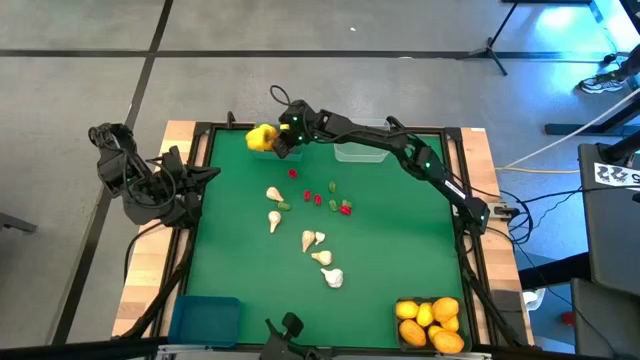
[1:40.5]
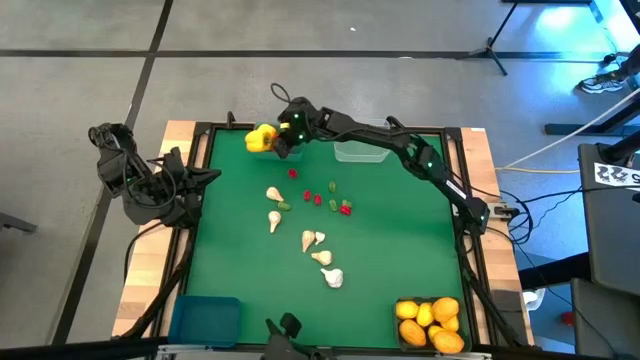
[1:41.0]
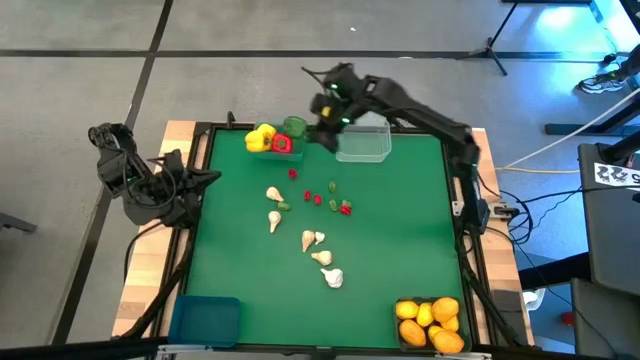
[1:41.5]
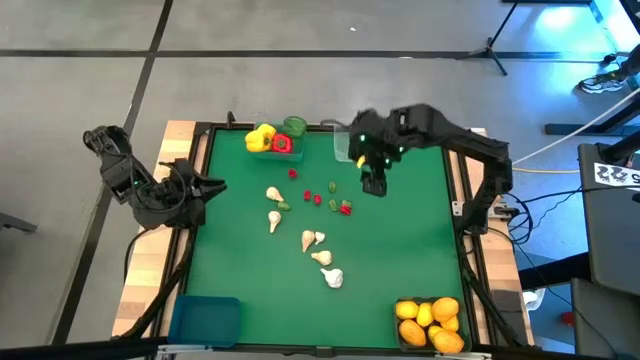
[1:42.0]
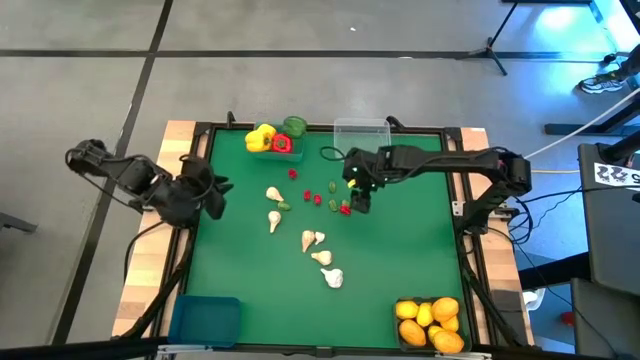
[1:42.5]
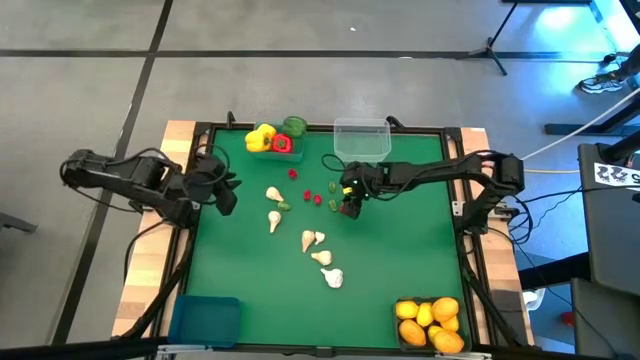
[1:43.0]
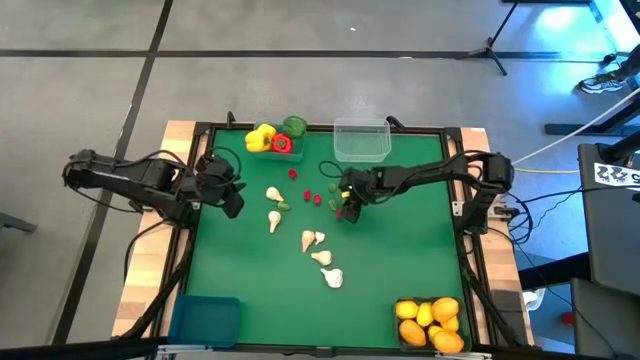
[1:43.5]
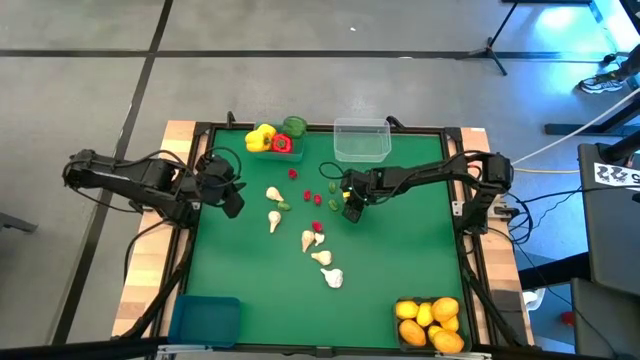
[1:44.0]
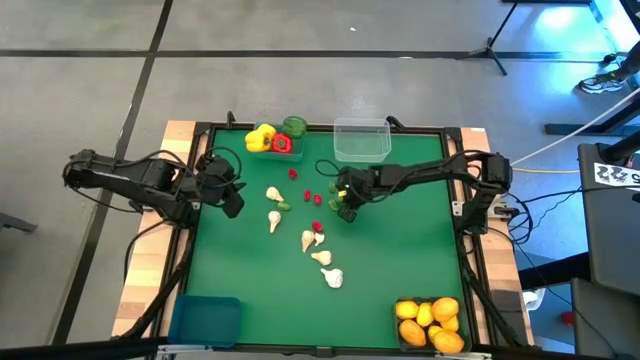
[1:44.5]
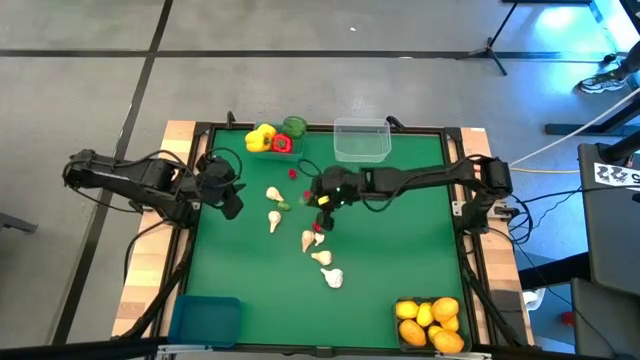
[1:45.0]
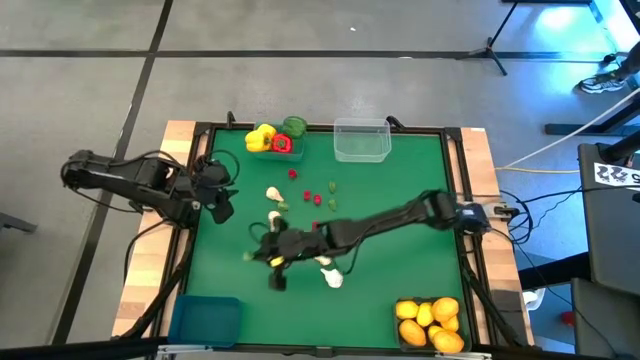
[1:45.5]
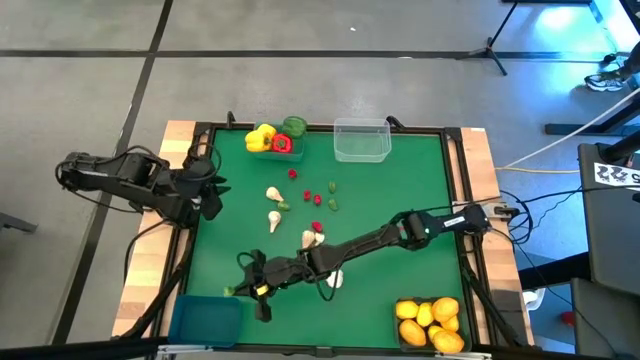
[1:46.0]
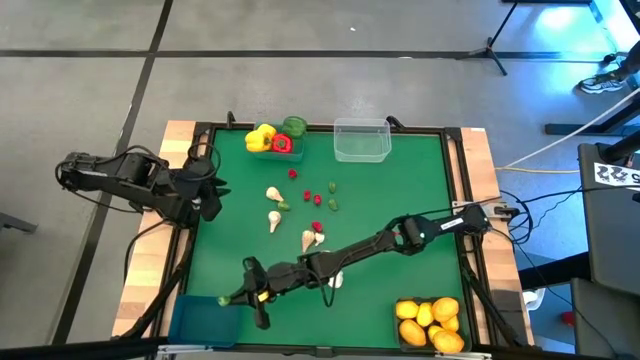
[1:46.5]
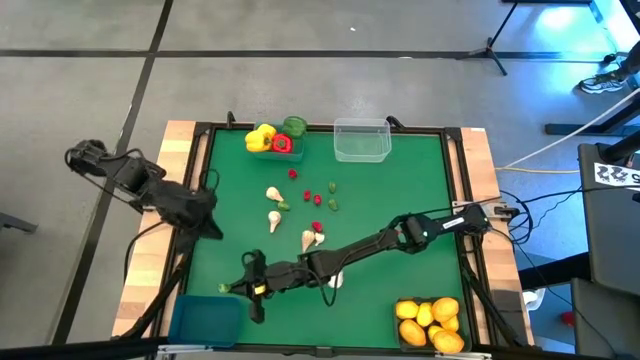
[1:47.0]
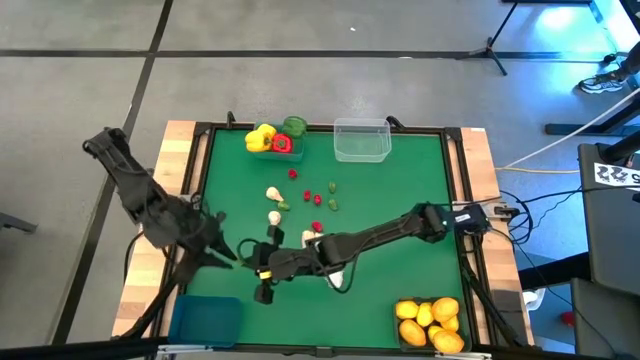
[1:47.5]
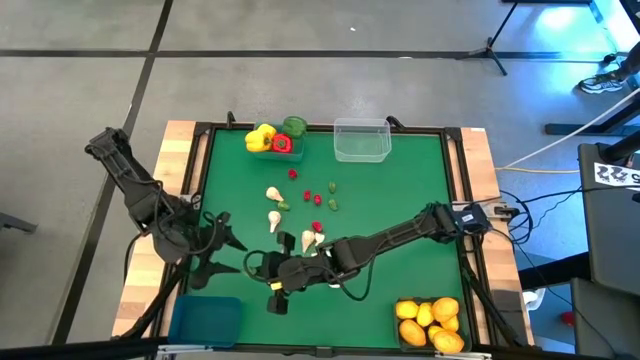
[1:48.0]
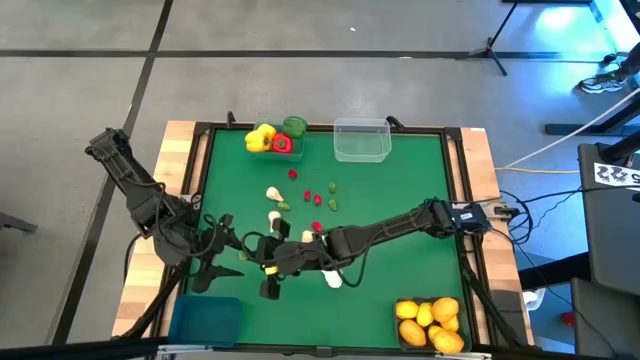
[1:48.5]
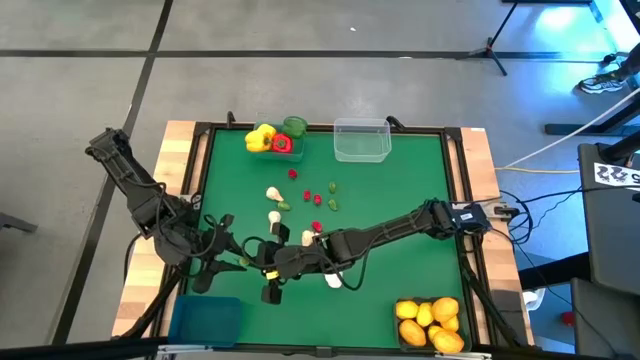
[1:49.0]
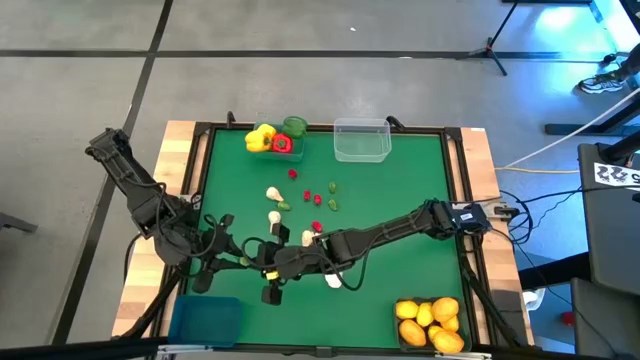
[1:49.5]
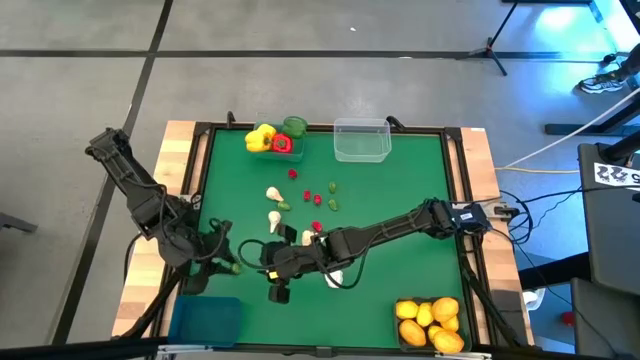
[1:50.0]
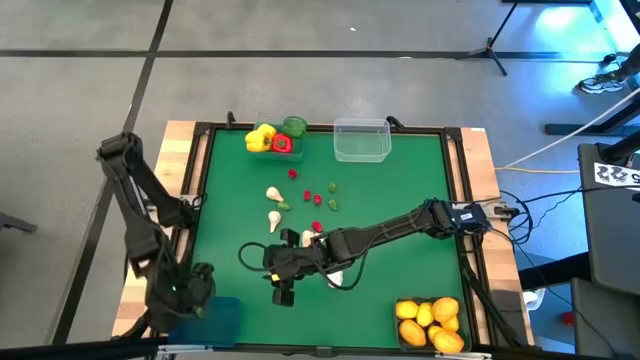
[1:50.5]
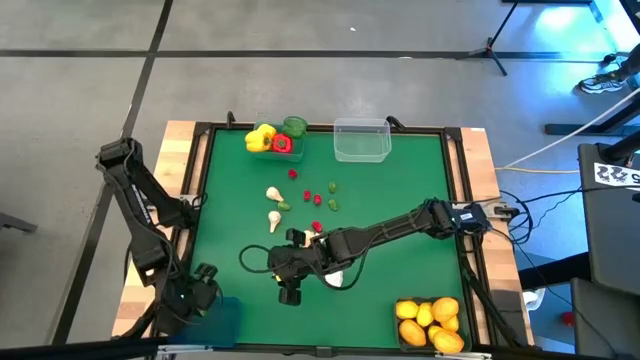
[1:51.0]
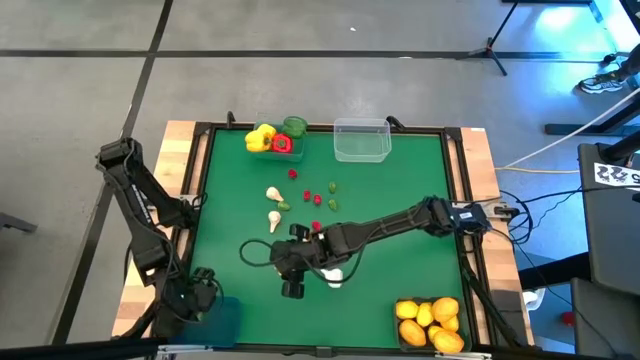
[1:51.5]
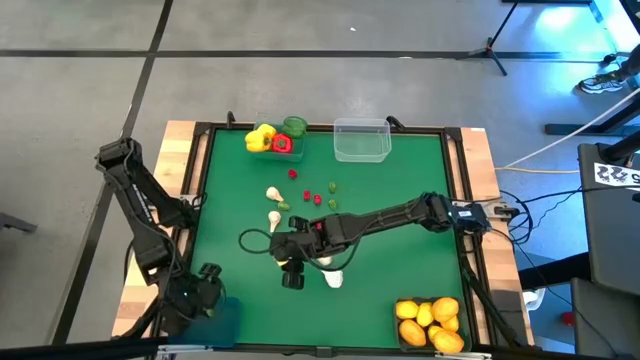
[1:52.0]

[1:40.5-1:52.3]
Task: Sort produce into baskets
Put the green chili pepper into the blue bin

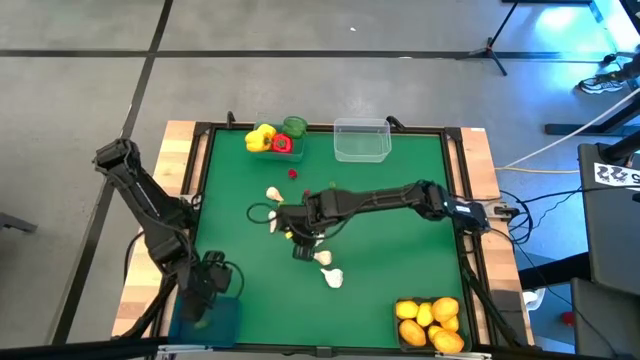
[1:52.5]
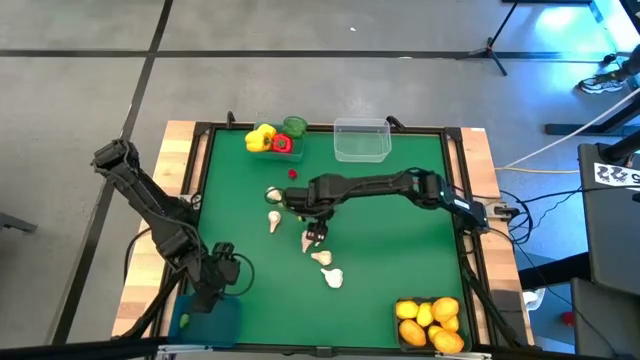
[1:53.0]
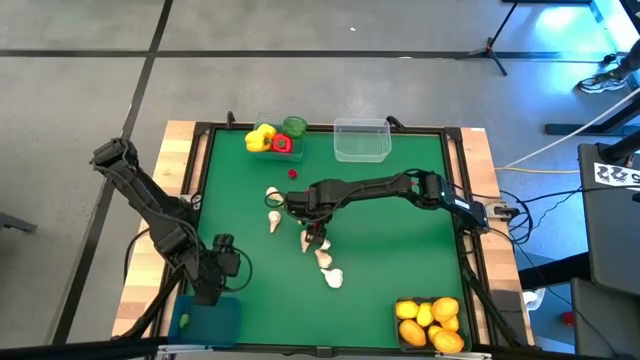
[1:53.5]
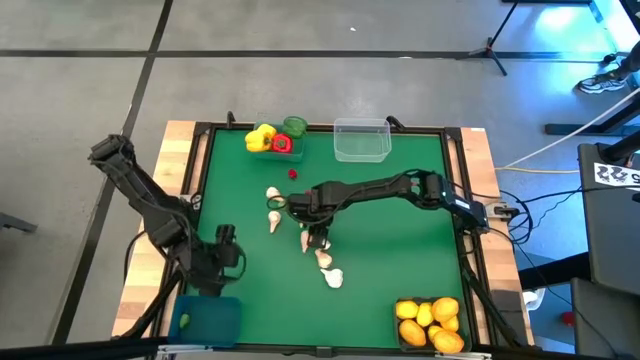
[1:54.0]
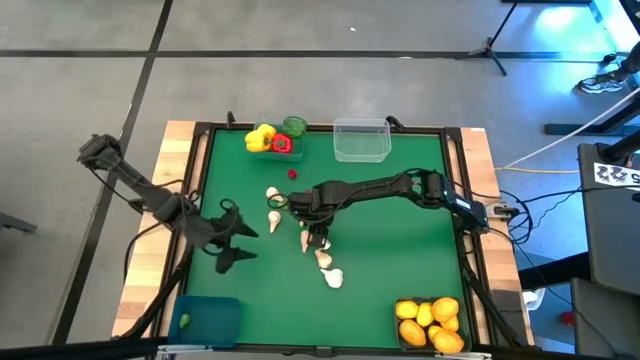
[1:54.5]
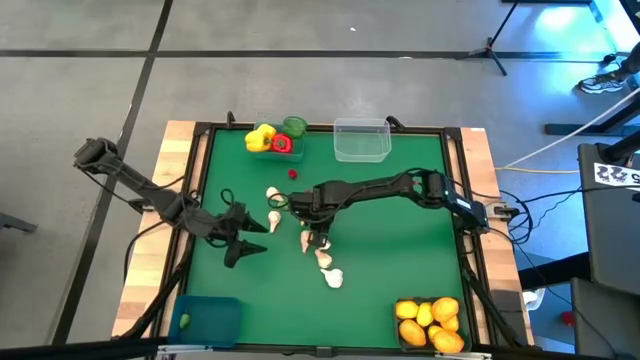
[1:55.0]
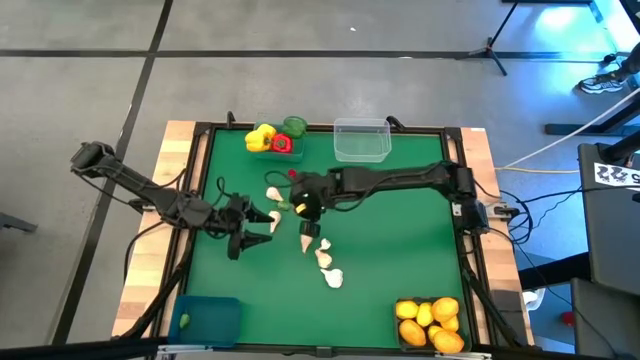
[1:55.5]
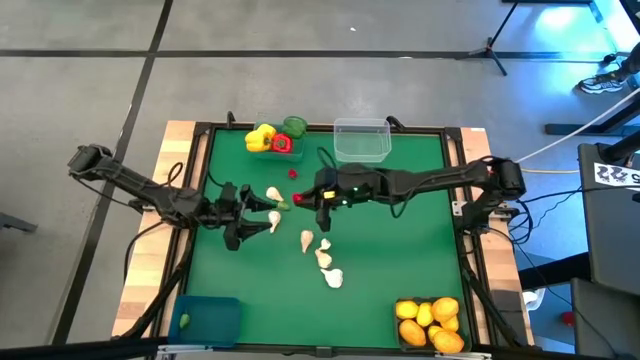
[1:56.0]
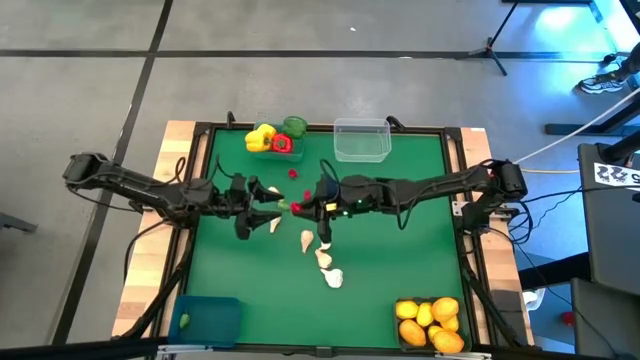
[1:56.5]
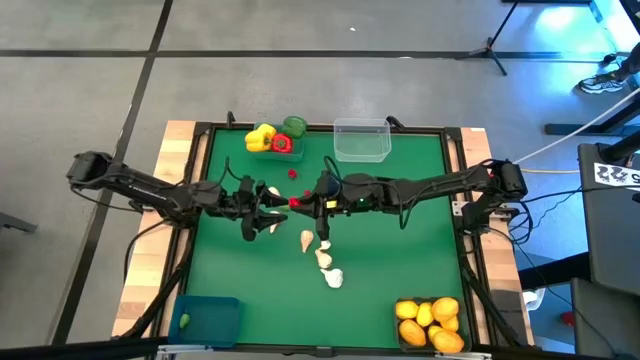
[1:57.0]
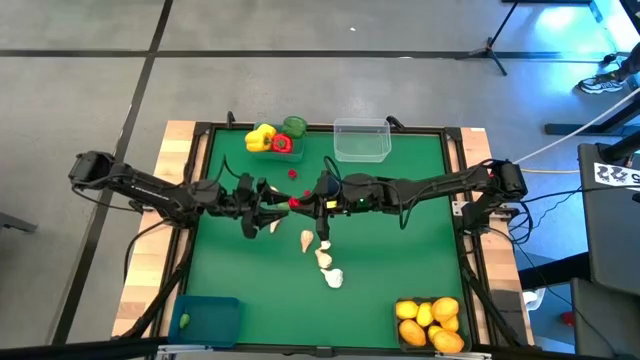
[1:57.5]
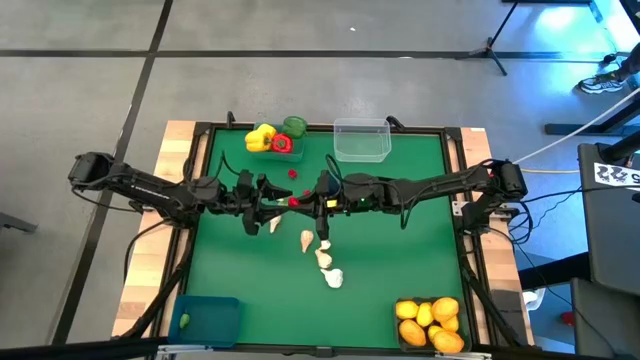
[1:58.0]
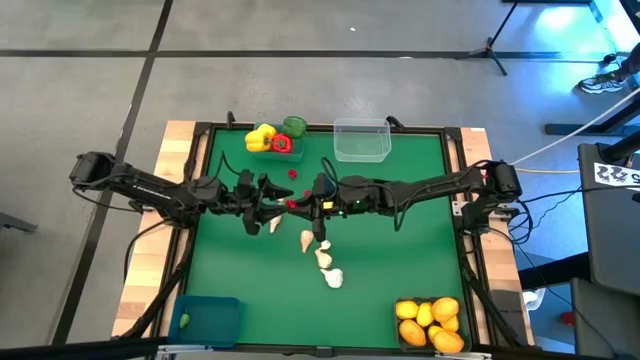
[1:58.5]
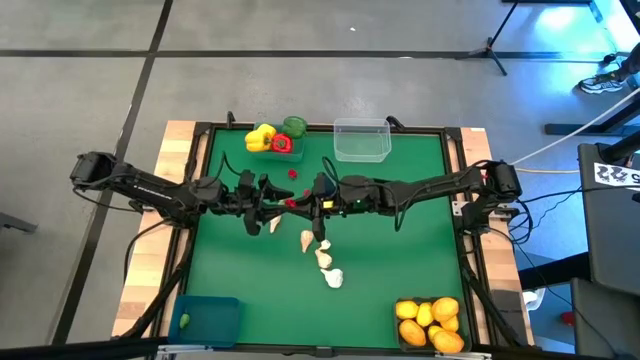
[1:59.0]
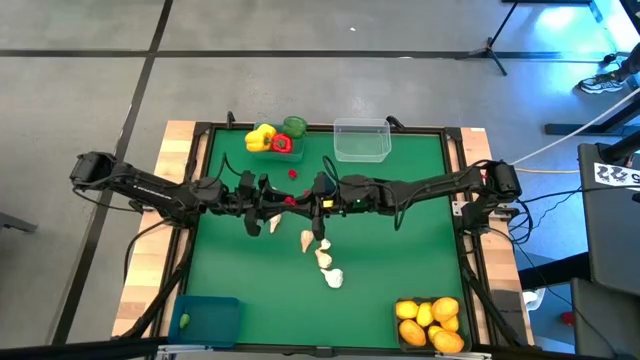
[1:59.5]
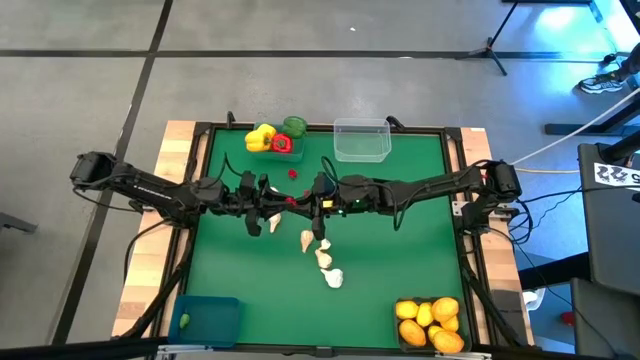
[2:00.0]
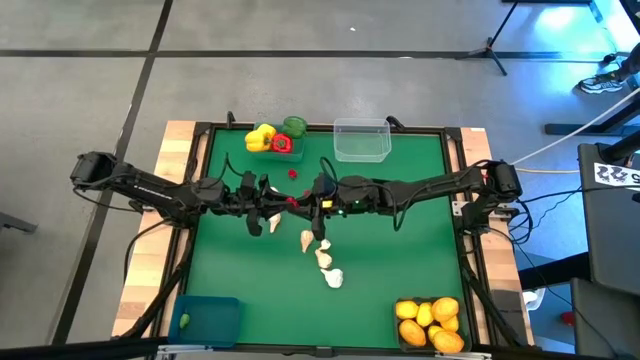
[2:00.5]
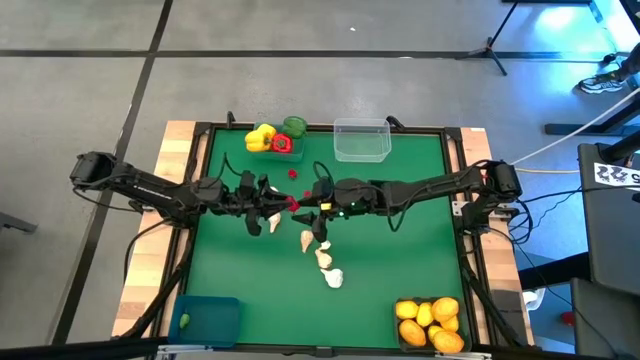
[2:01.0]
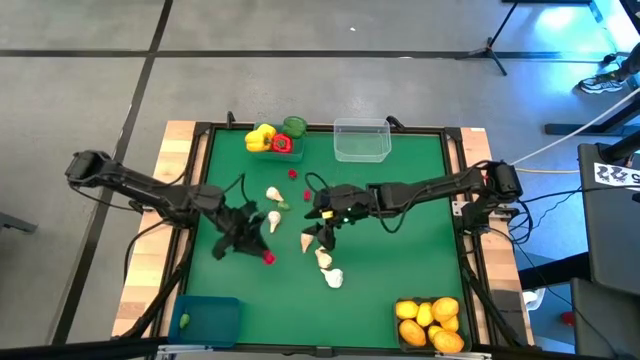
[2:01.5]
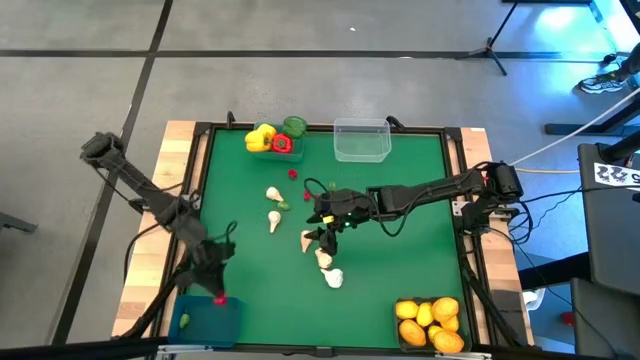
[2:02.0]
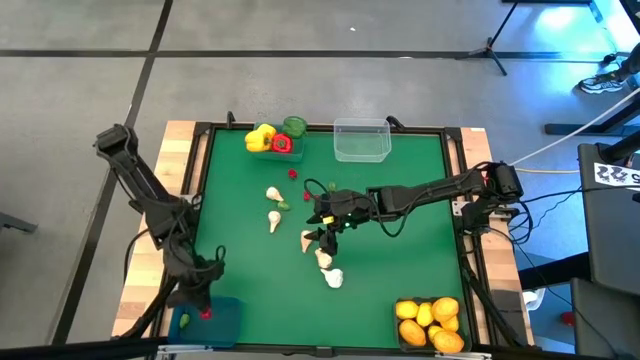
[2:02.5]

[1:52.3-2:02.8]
Put the red chili pepper into the blue bin
